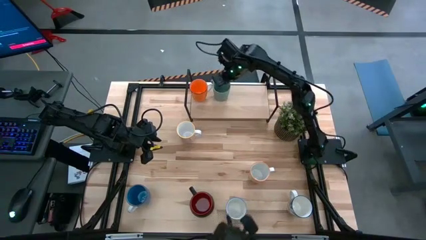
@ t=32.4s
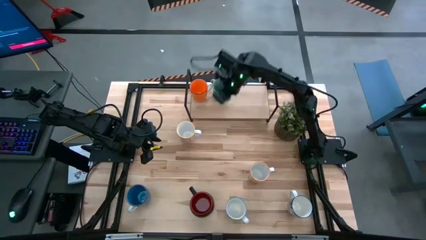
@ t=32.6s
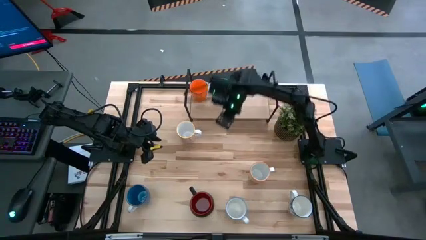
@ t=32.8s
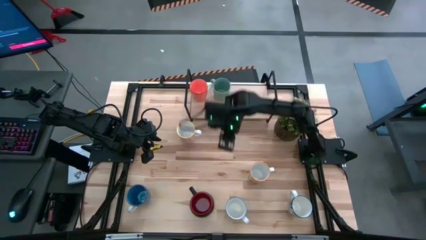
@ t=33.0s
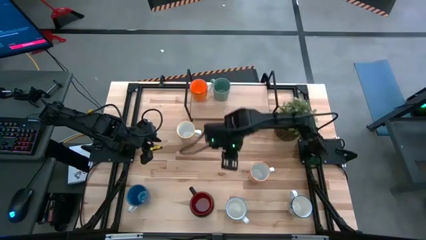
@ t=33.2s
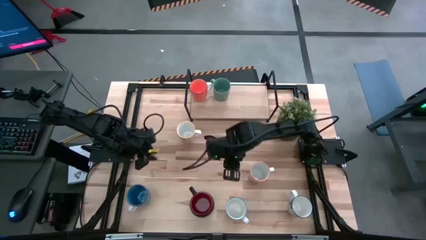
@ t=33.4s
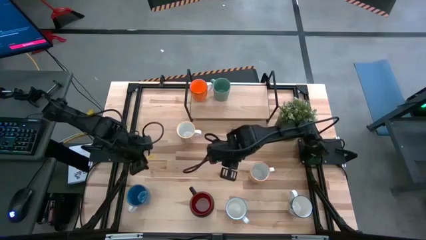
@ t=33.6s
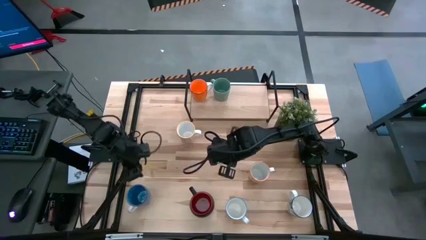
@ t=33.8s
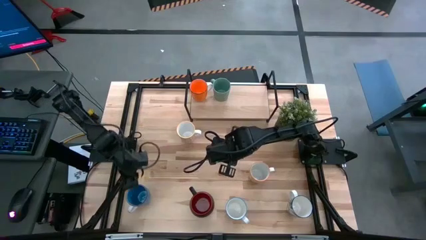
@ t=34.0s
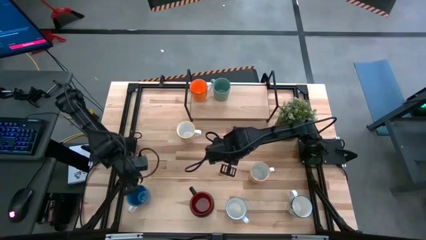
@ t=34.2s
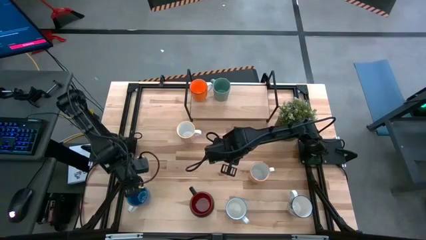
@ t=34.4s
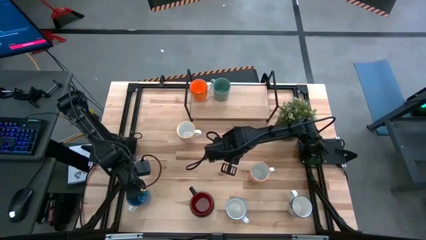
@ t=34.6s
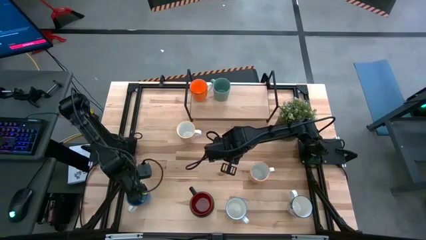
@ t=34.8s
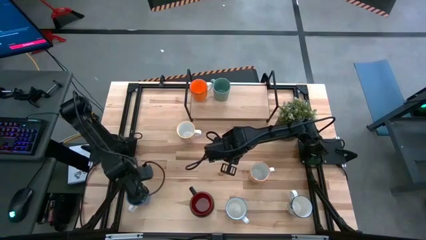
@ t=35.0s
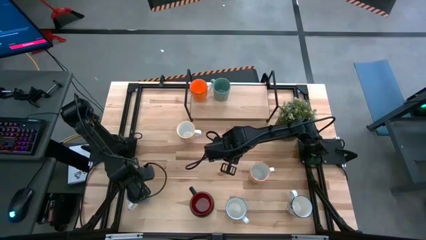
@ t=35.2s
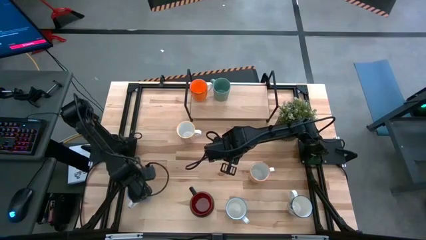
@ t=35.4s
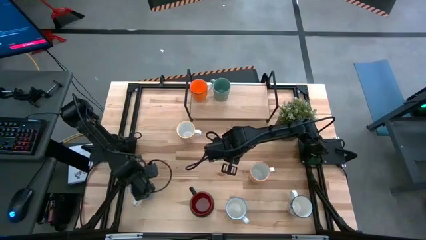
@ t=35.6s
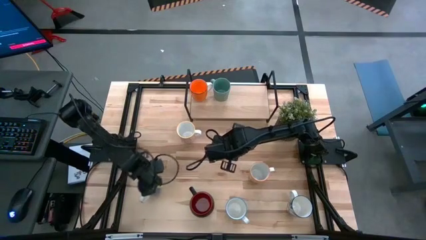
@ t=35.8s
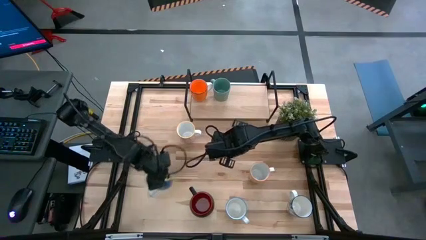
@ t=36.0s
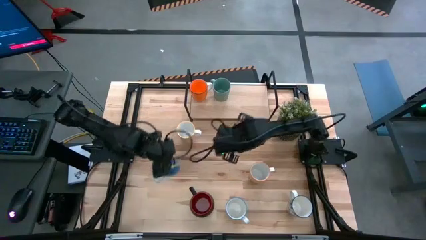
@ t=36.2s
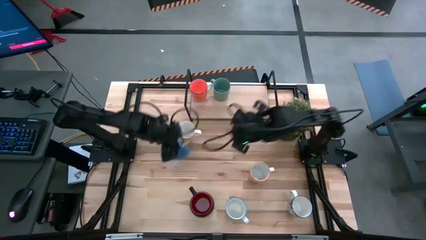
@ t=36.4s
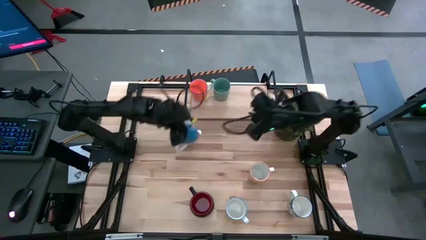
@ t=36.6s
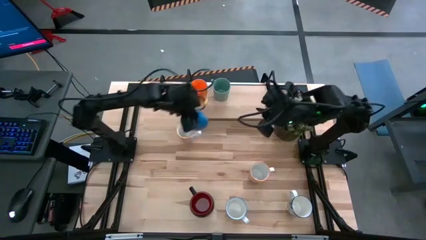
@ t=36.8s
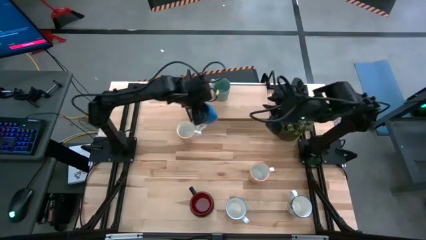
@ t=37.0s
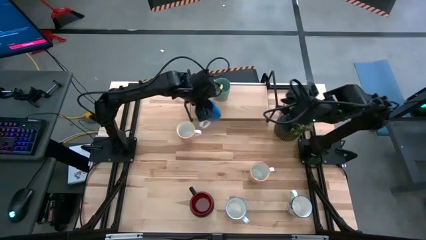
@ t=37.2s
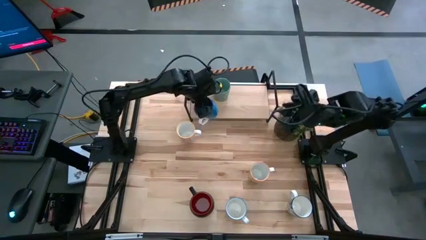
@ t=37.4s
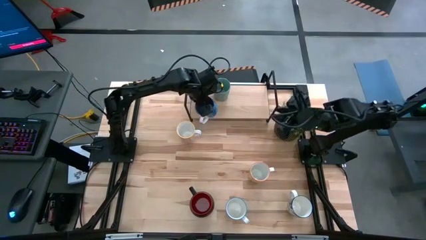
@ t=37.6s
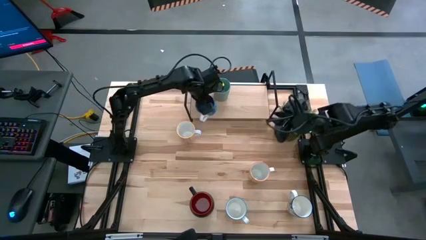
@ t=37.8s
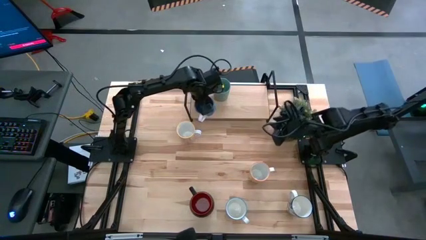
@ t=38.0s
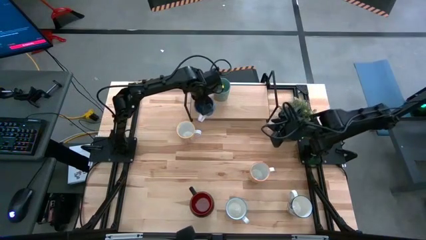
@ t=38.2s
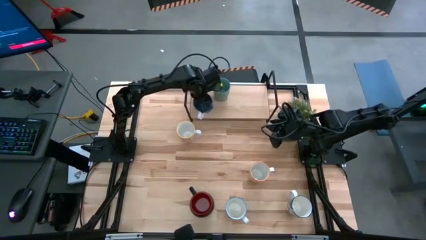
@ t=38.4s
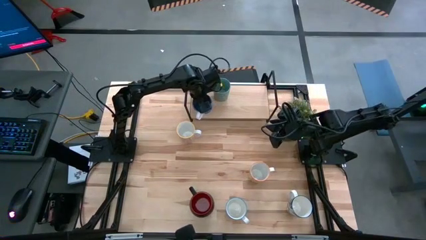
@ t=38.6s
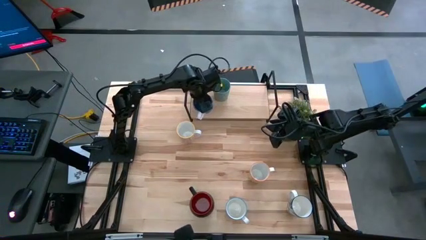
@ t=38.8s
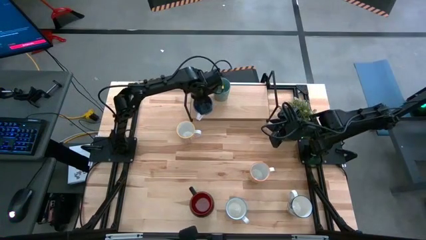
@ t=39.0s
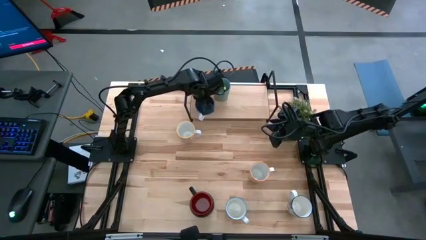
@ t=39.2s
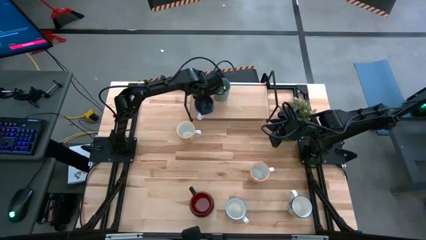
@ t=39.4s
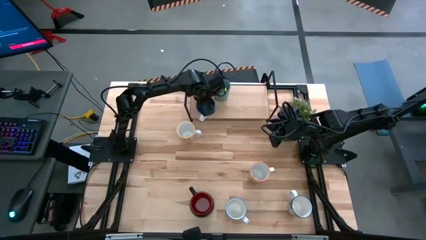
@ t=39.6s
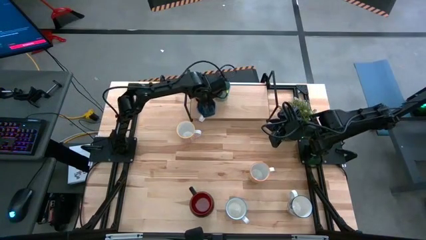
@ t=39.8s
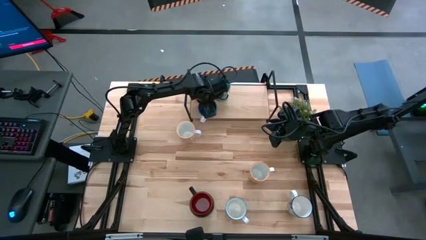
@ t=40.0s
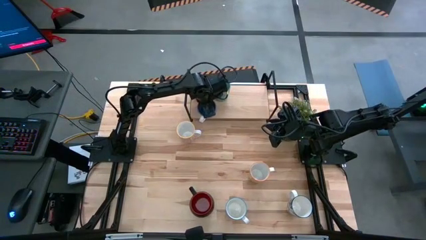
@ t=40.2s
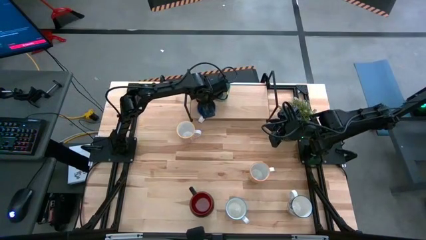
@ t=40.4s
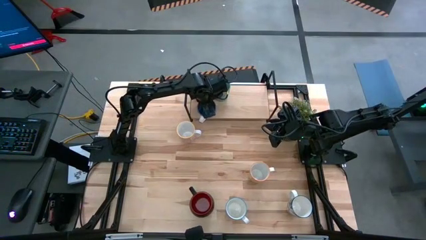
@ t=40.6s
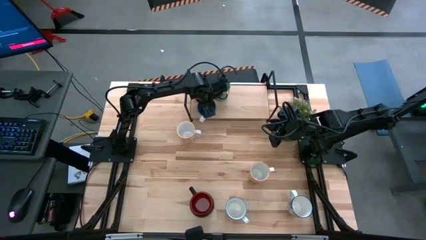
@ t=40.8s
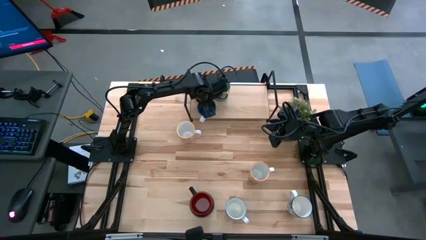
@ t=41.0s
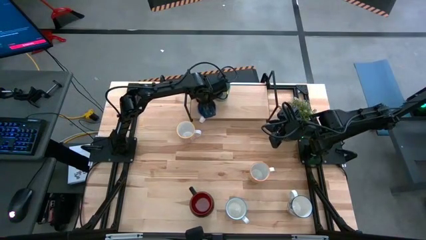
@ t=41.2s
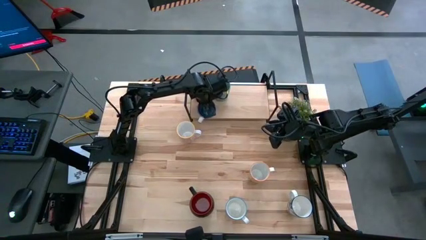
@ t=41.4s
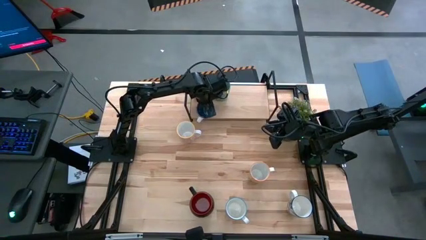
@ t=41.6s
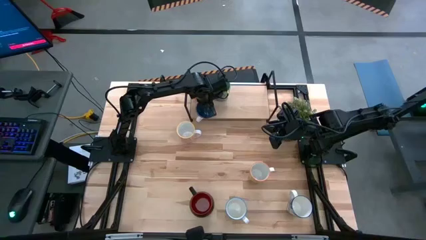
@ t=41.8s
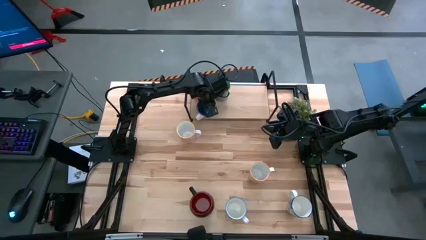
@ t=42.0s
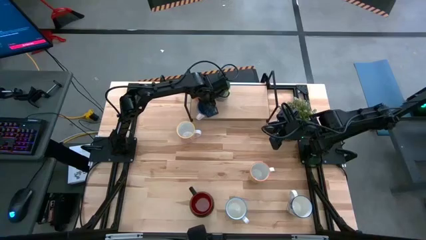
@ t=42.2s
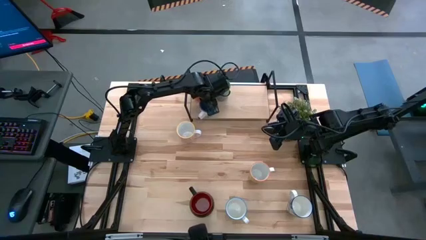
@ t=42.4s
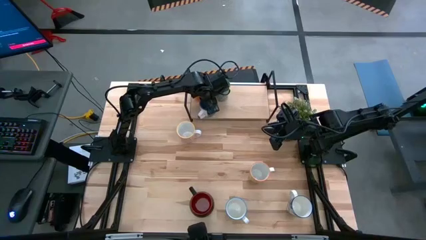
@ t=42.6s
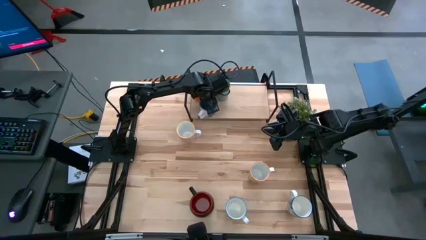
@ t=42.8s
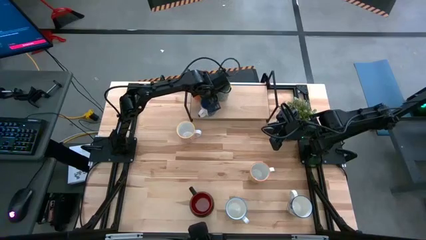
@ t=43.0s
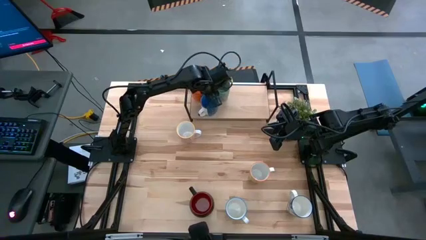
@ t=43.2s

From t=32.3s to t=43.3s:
Task: Place coffee mugs
Put the blue mug on the shelf

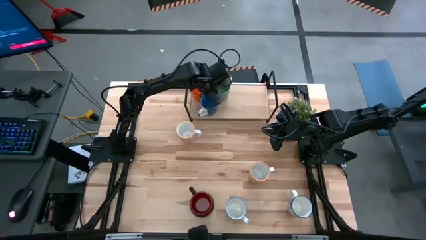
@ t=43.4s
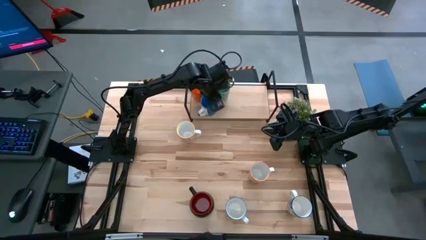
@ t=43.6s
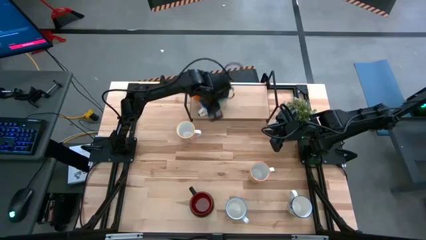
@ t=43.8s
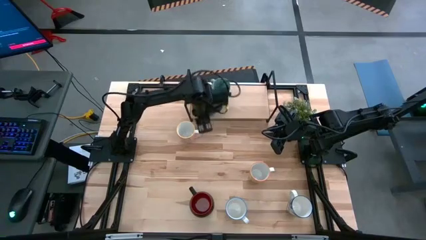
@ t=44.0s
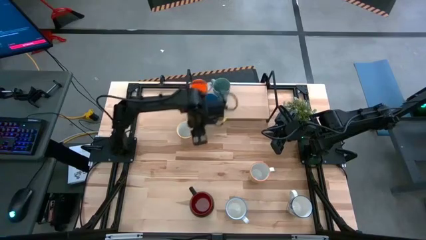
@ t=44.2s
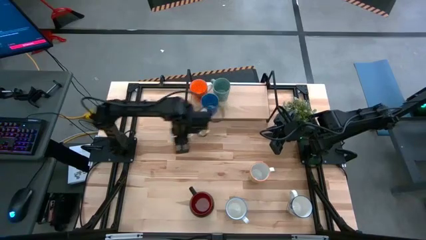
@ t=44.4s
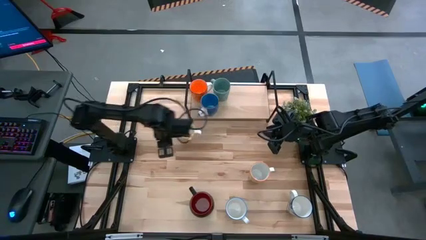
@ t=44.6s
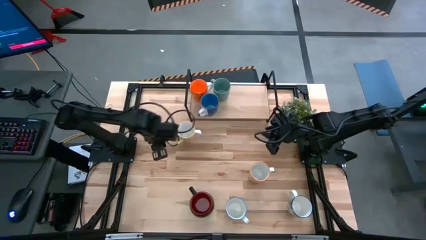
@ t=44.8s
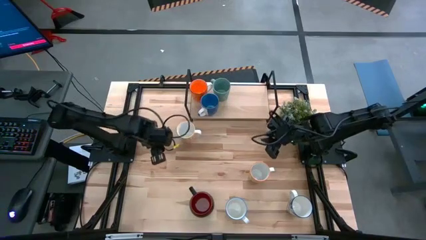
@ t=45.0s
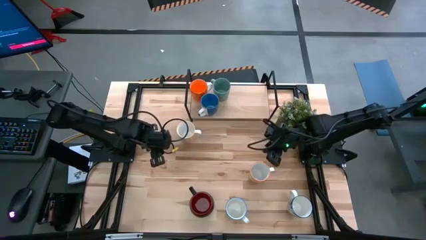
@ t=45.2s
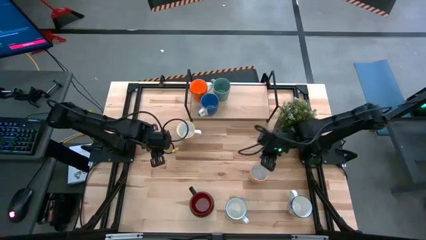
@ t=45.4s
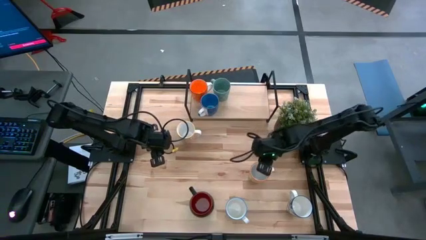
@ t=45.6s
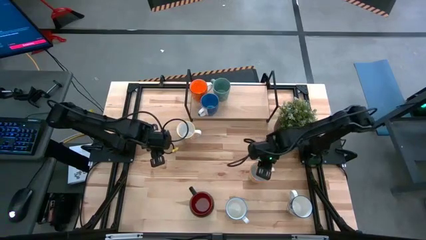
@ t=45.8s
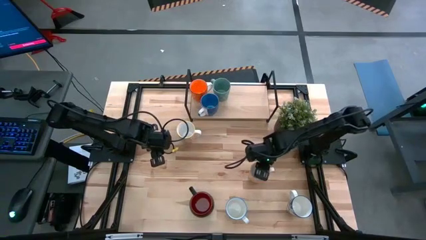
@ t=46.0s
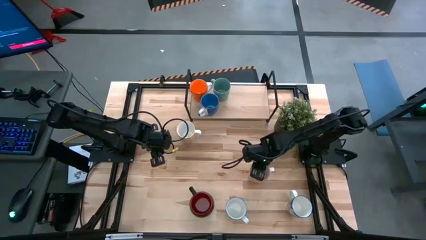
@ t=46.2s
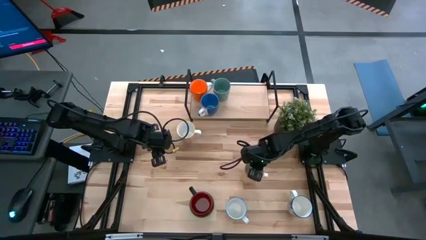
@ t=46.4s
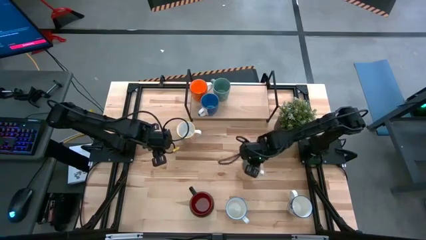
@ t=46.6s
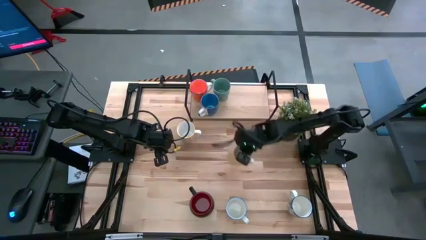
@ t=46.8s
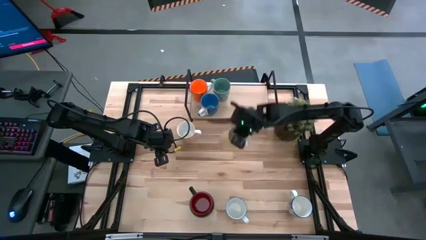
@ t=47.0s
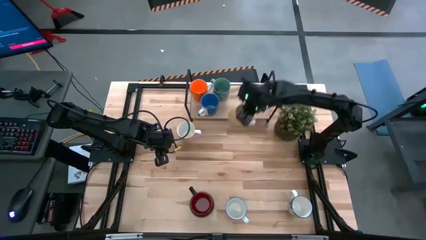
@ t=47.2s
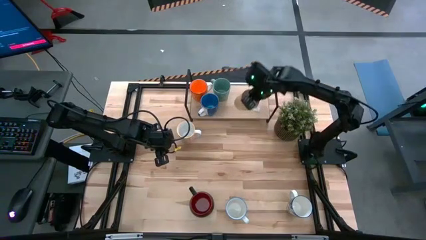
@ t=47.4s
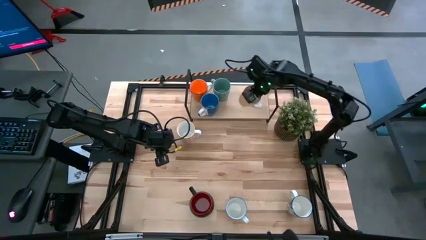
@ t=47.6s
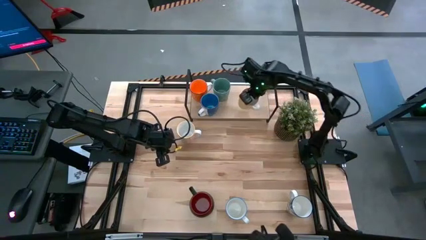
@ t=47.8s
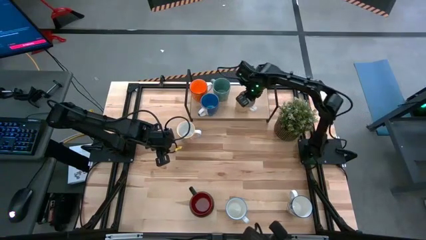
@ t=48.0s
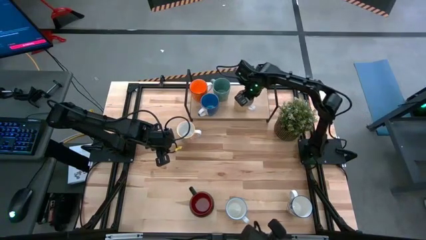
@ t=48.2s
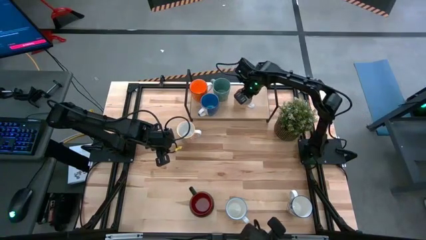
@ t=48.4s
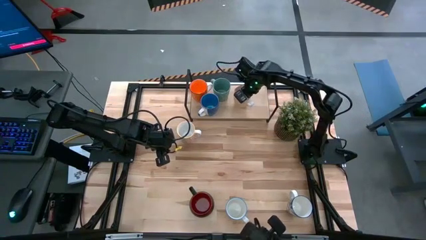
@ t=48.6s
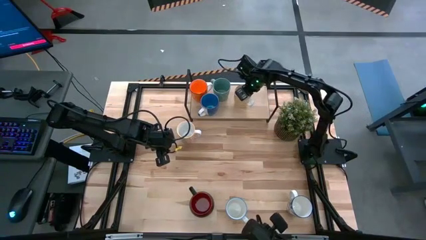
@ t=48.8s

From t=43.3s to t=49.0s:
Put the yellow patterned mug on the shelf
